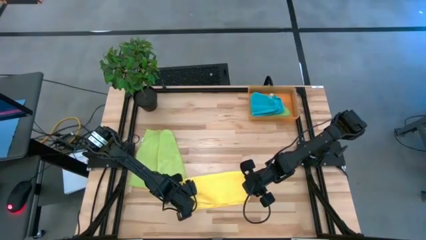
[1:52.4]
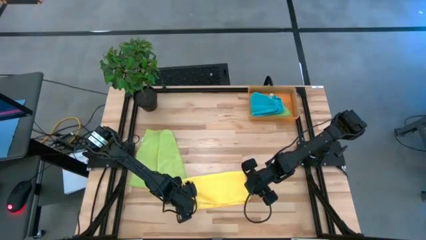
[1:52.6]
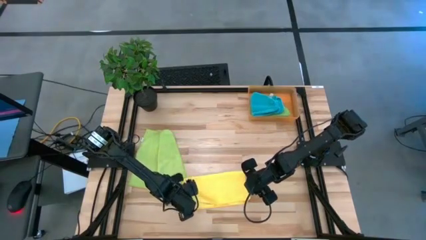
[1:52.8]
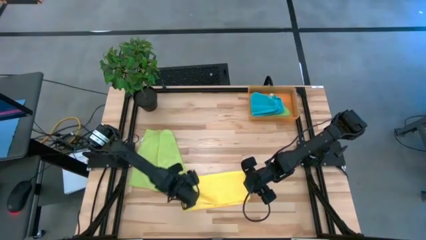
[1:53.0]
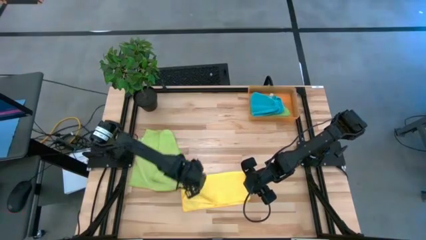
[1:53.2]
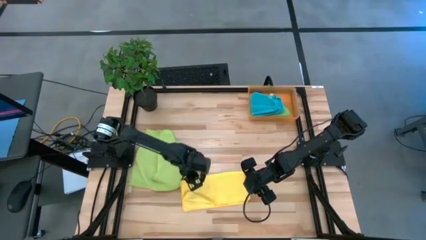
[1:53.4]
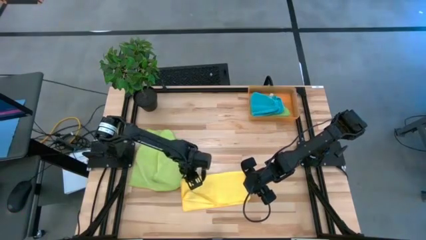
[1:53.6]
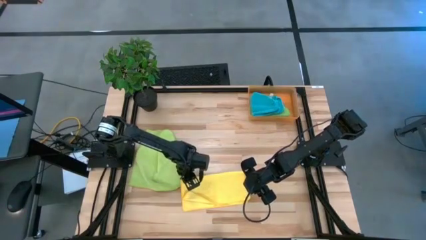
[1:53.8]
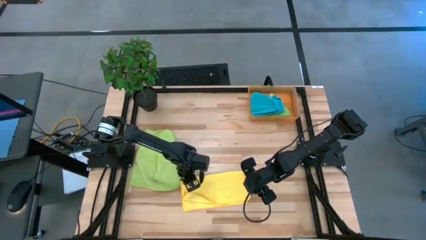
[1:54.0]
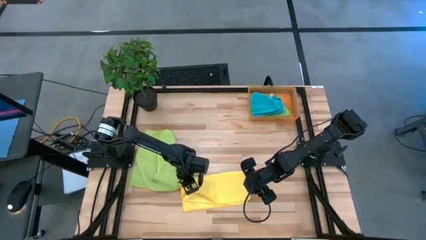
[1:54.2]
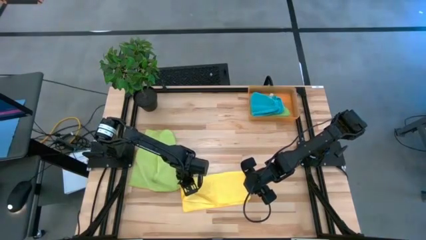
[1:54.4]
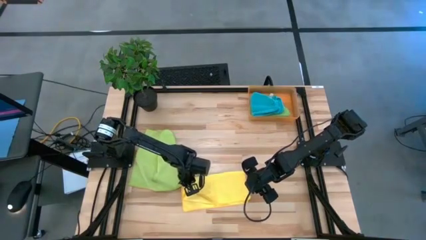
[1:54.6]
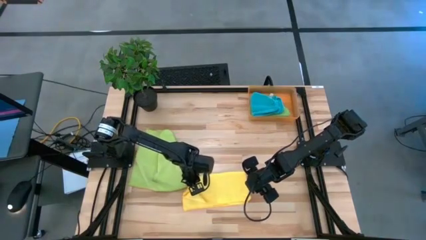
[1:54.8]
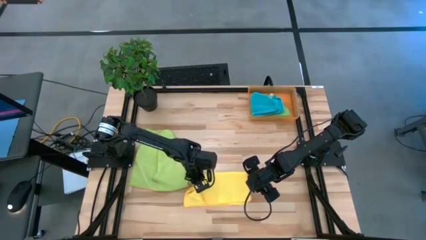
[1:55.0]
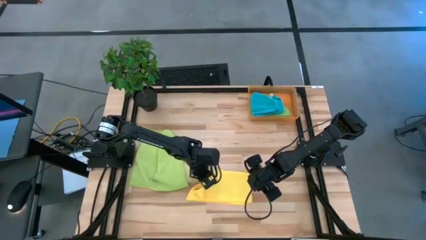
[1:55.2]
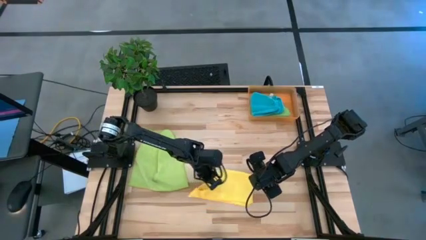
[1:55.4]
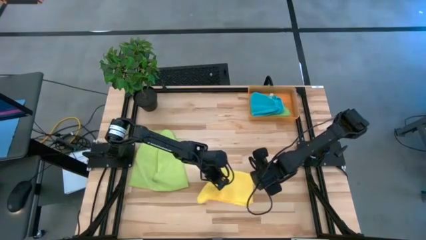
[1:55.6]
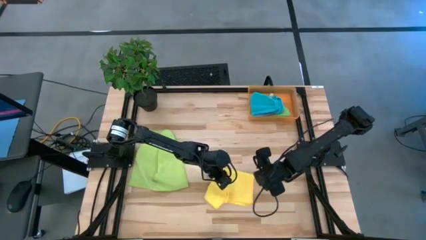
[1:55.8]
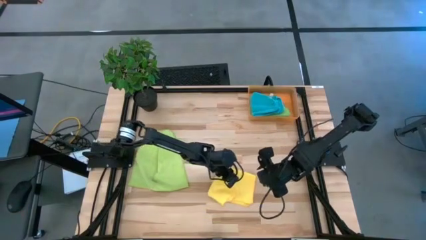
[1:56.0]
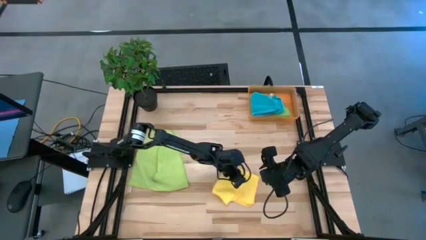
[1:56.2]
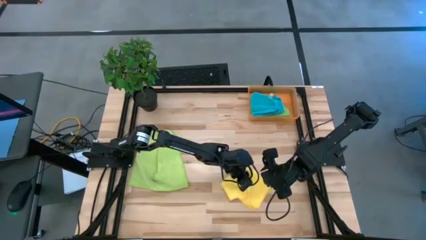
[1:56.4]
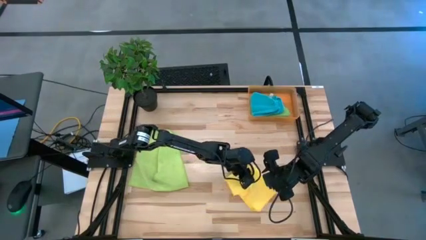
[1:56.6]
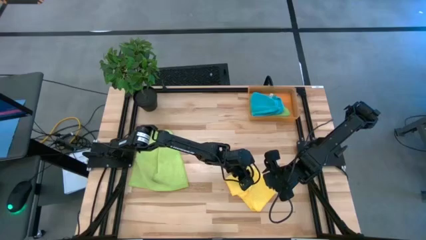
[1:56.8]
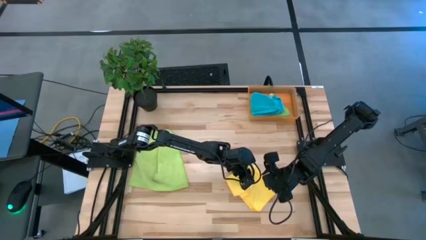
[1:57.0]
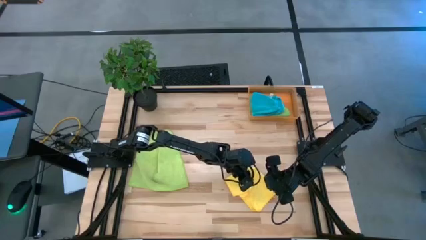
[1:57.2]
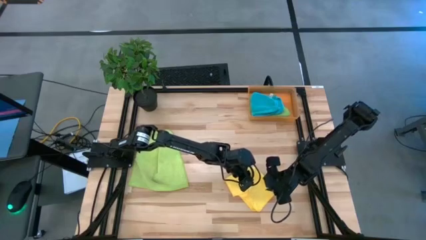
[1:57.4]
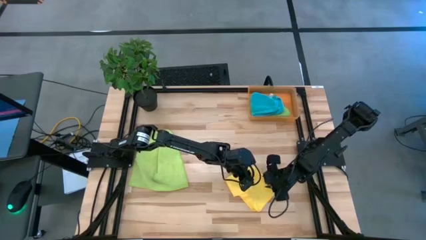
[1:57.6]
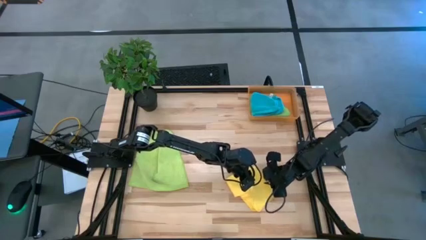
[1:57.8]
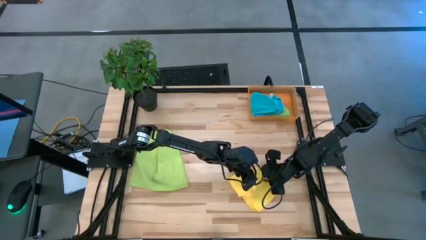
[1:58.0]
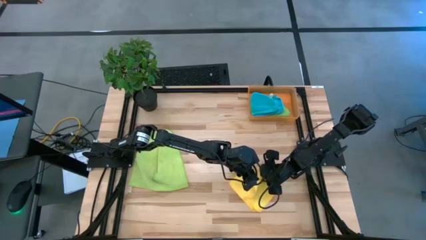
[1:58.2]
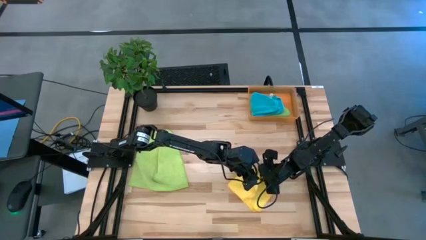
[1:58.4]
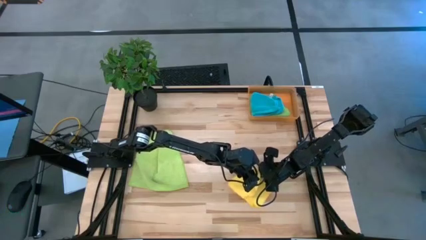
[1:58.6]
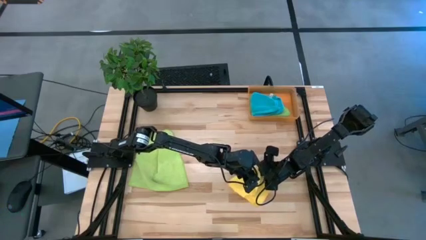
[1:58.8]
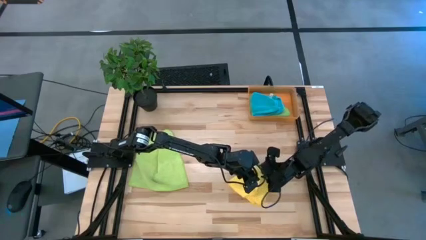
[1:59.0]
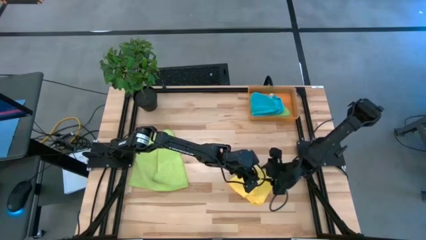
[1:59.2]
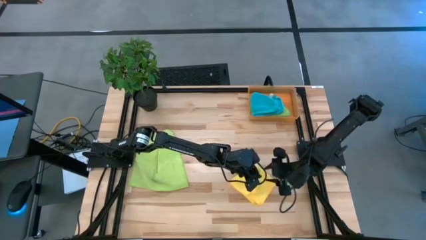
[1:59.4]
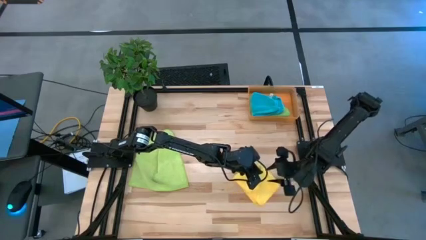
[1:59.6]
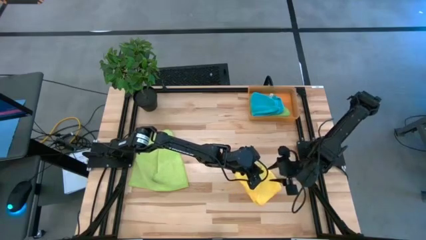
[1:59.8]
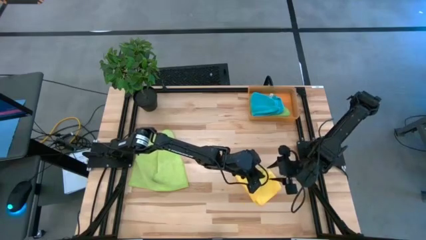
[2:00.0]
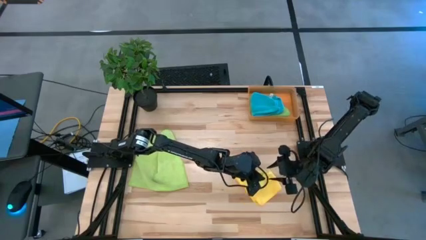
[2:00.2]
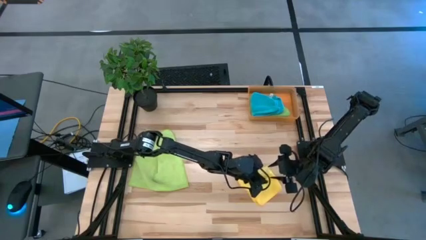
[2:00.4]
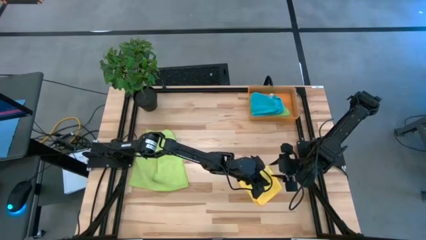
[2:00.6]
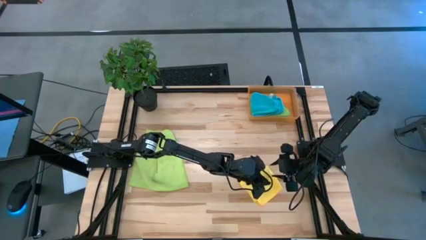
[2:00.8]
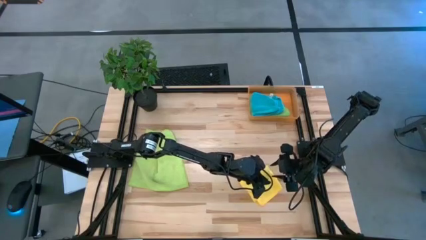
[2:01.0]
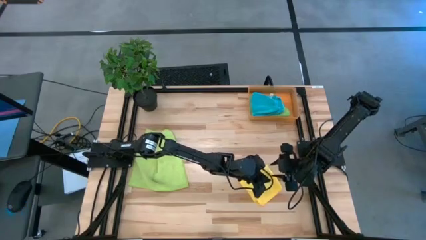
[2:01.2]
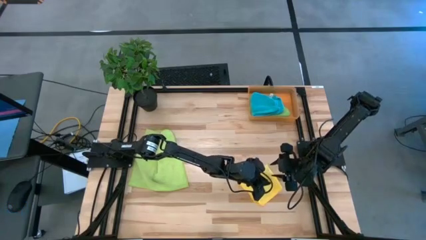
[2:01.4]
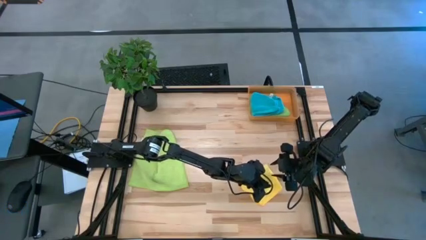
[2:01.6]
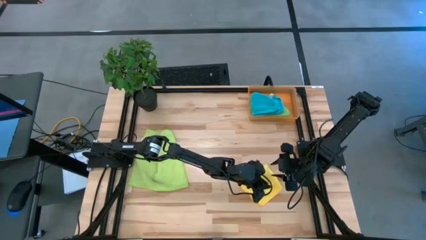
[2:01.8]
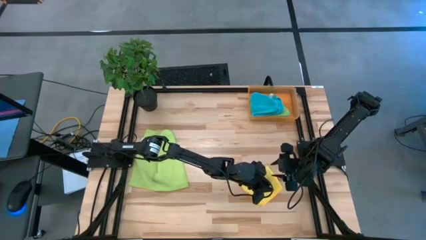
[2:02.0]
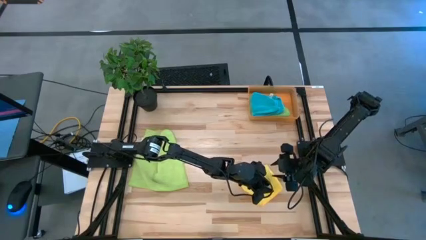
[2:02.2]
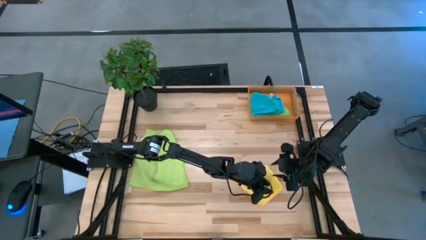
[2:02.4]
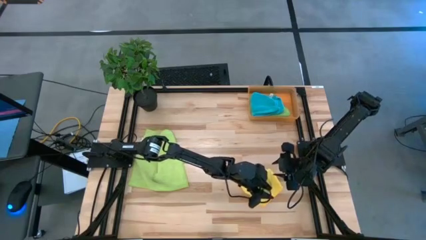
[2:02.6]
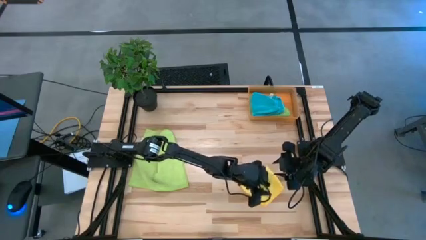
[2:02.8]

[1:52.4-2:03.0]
Task: Fold microfiber towels
Fold the yellow microfiber towel

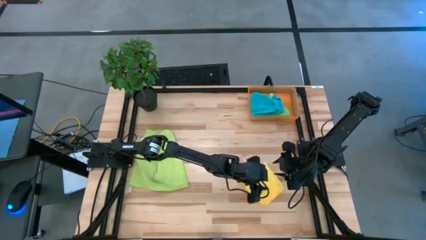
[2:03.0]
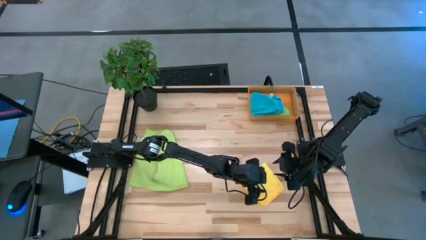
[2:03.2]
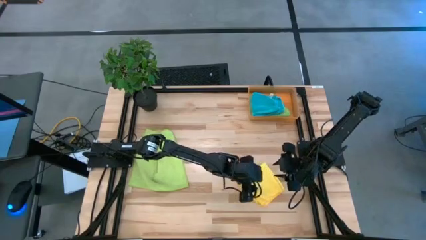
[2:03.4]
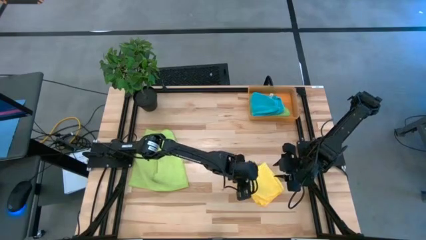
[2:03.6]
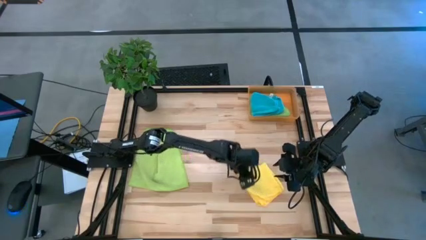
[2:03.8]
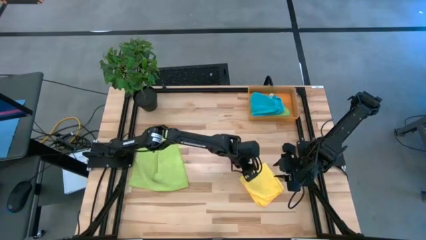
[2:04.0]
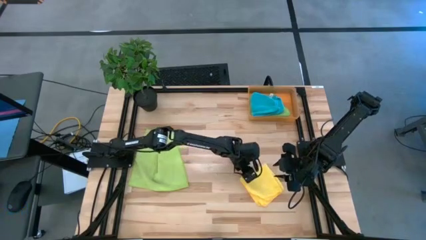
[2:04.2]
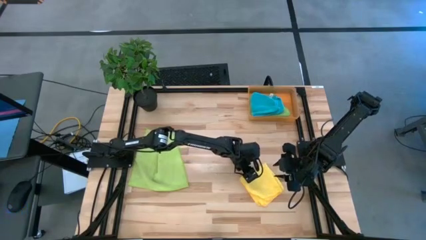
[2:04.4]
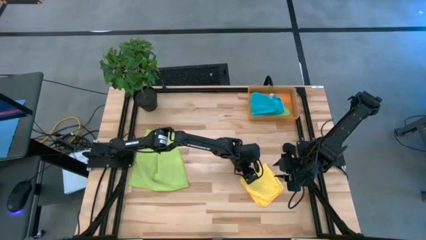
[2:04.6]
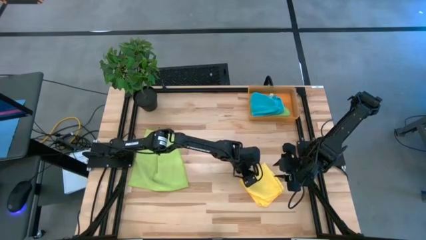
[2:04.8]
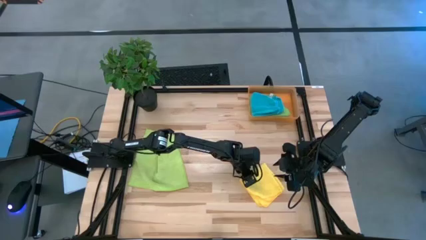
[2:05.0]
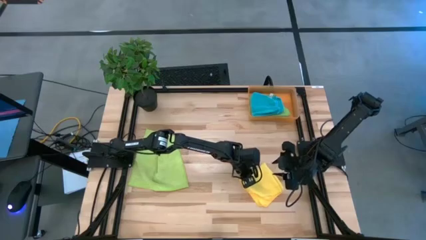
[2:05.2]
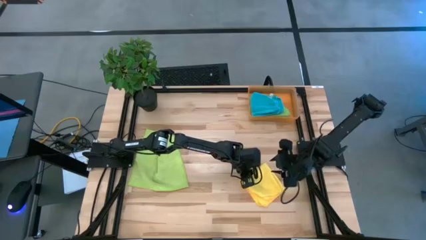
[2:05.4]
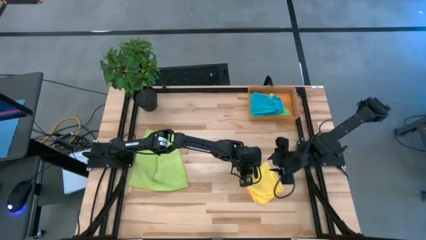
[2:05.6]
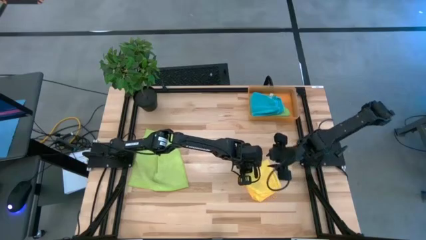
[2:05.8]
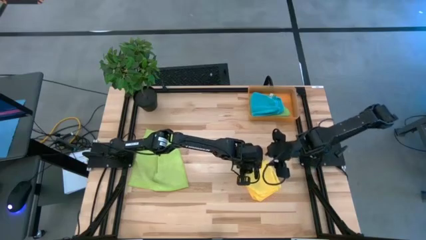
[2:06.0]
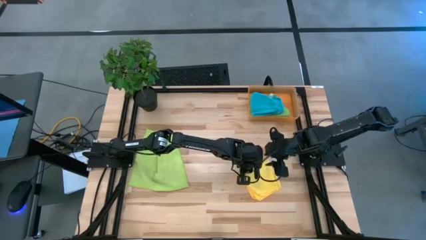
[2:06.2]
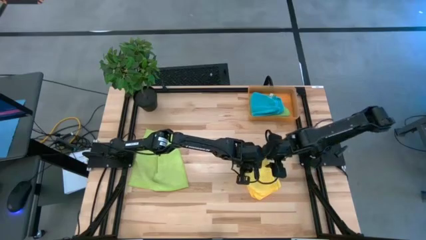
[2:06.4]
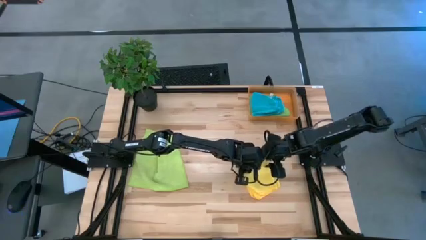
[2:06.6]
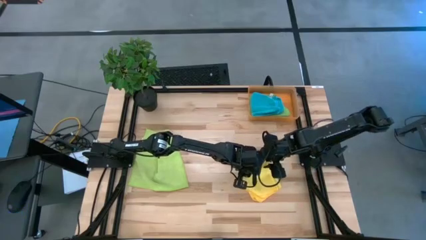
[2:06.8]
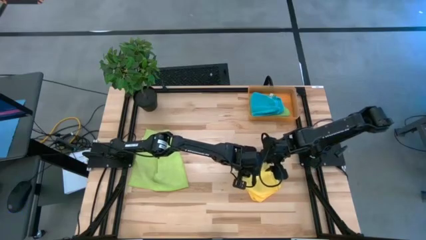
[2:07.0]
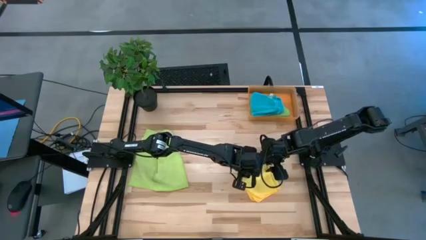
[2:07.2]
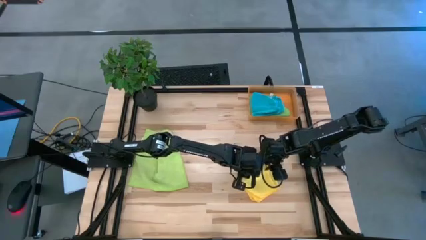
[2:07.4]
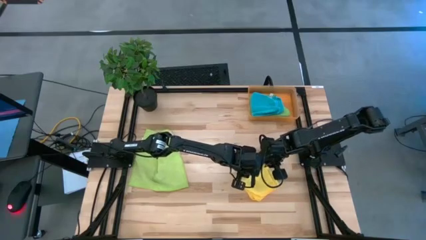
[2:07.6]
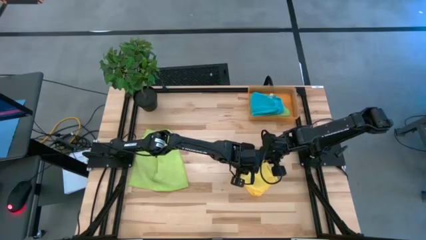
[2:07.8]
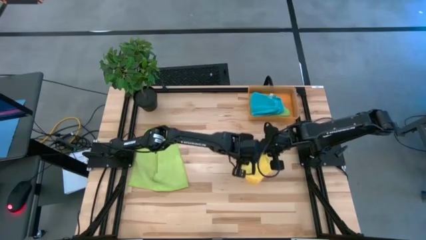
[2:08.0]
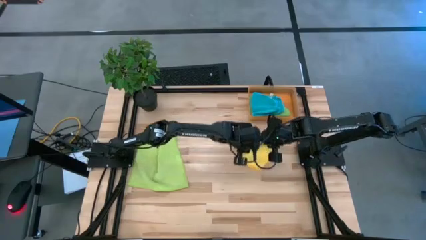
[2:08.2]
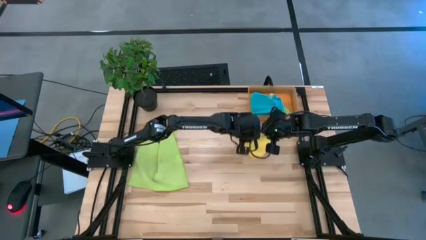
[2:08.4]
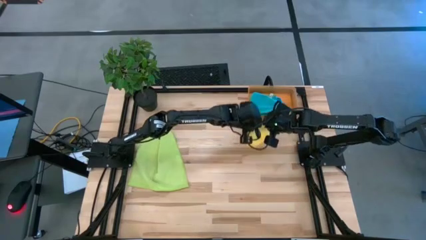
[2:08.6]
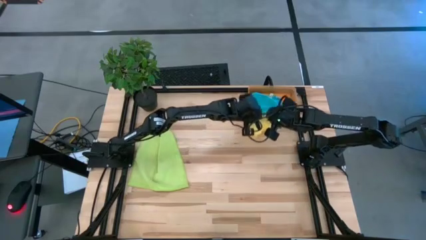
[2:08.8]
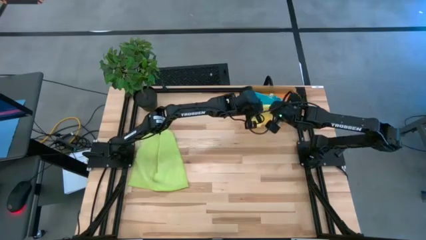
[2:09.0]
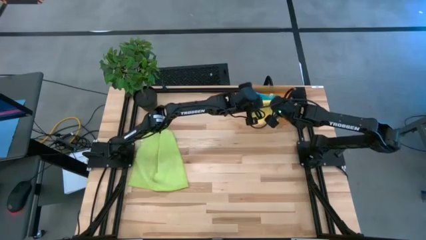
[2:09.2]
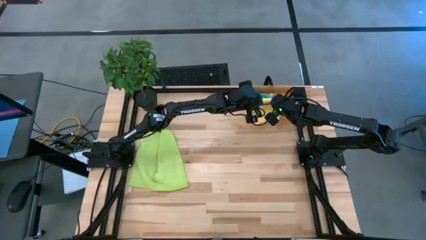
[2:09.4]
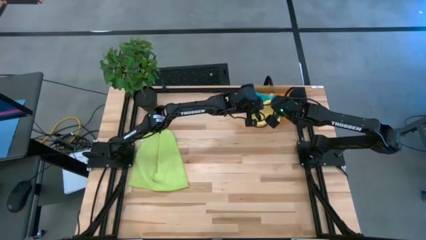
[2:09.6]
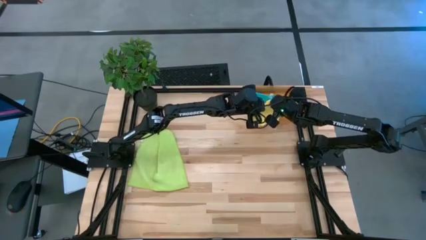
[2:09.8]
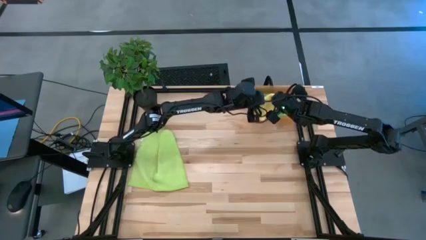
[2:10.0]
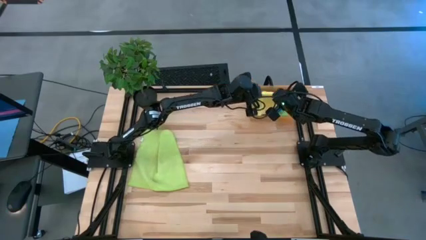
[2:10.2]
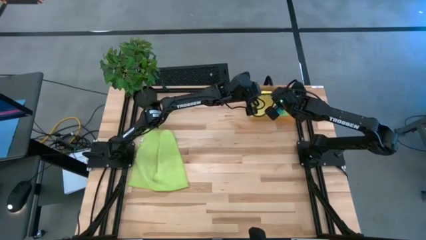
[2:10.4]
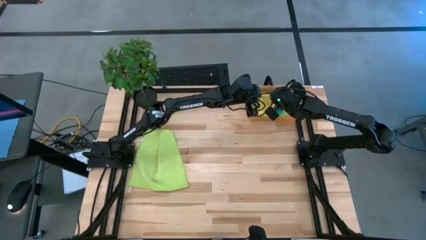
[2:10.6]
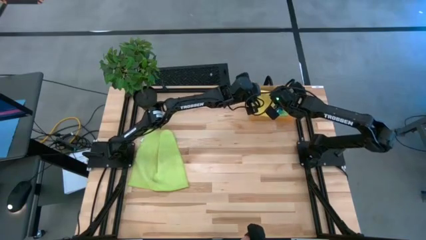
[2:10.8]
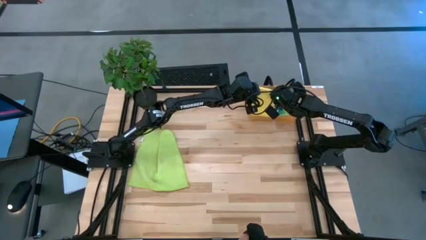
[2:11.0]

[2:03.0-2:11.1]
Put the yellow microfiber towel into the orange bin
